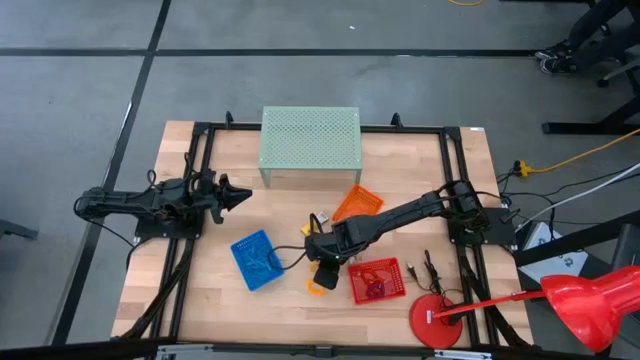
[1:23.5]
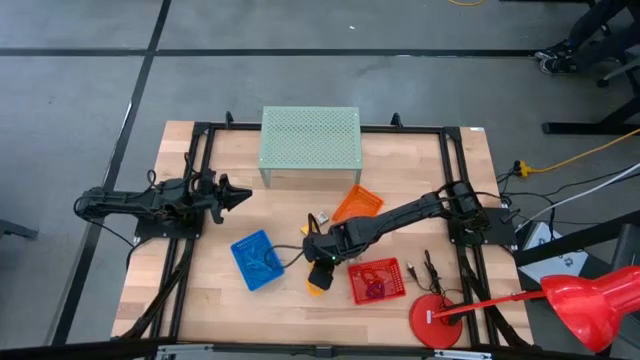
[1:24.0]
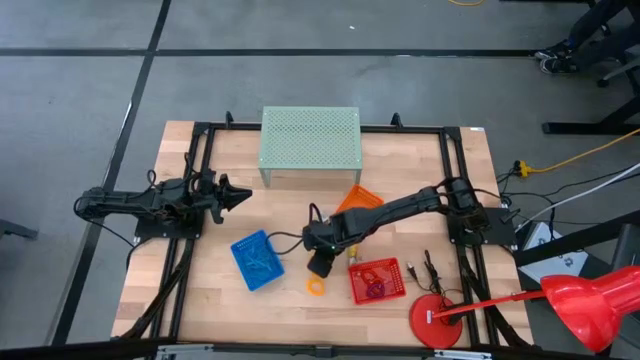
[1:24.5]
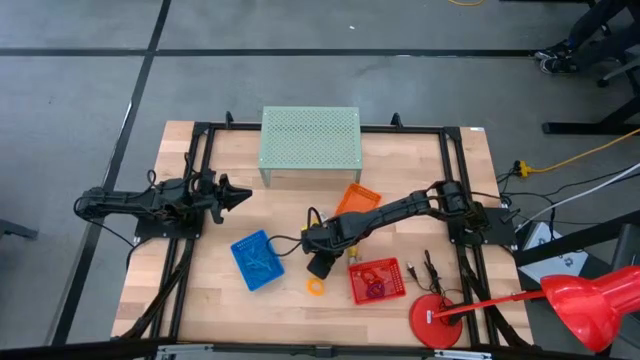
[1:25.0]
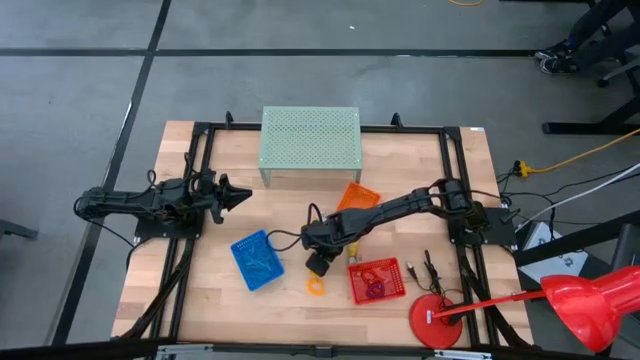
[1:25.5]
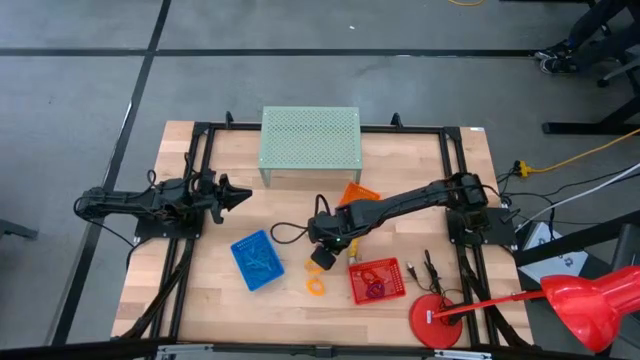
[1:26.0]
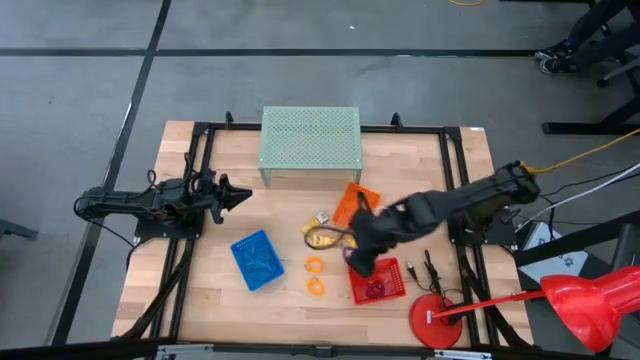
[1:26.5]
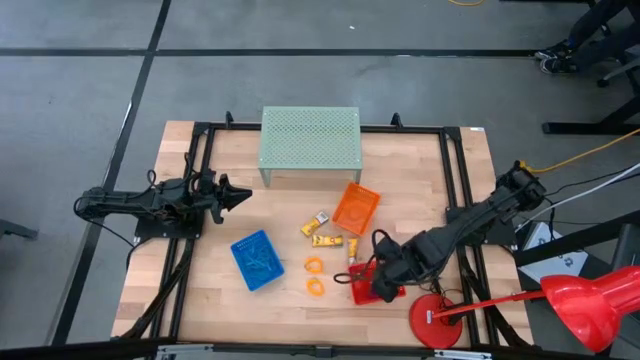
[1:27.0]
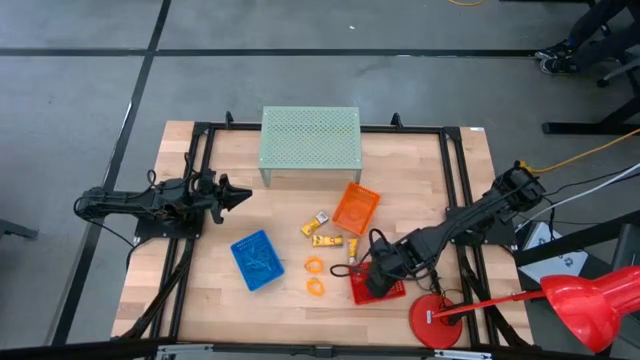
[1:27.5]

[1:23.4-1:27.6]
Task: Pick & Place Office Desk Supplies
Put the violet spring keychain into the red bin

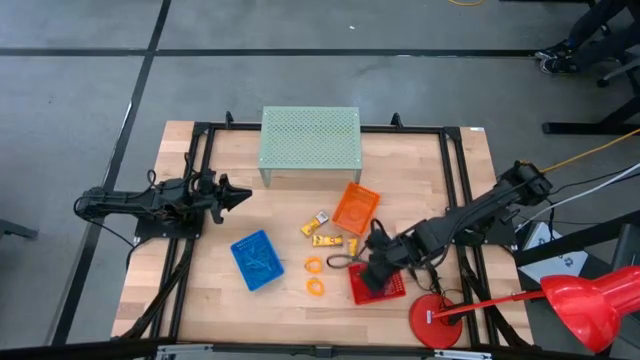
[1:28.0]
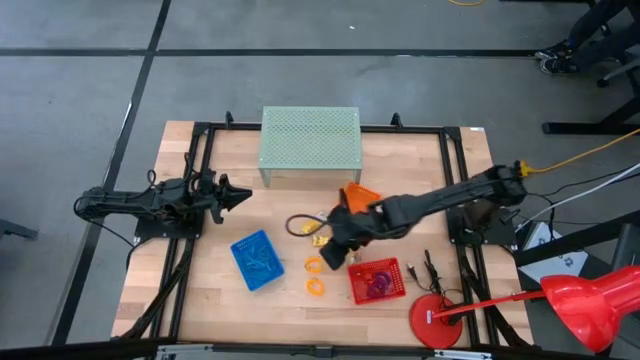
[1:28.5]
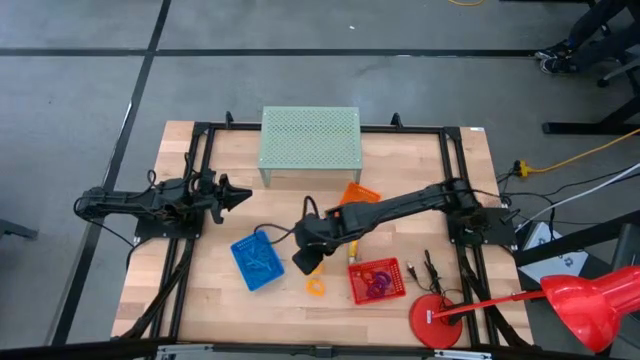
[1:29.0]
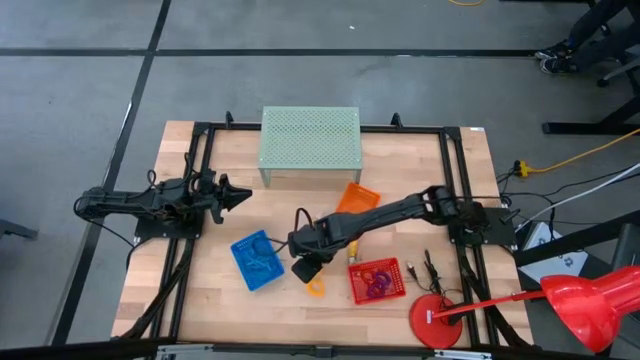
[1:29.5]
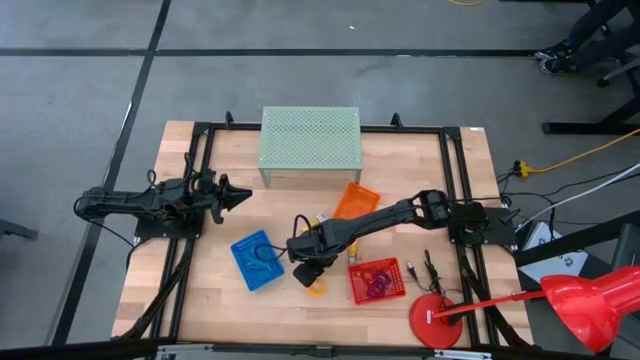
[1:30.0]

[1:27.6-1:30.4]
Put the yellow spring keychain into the red bin

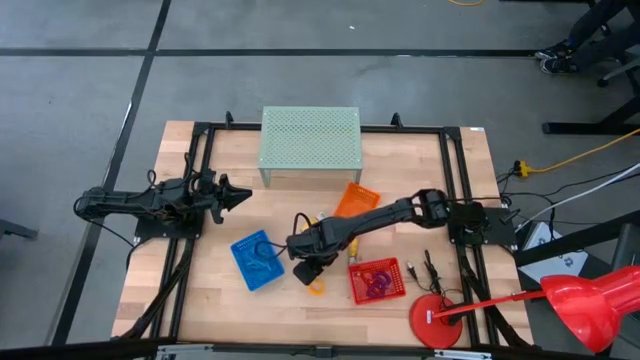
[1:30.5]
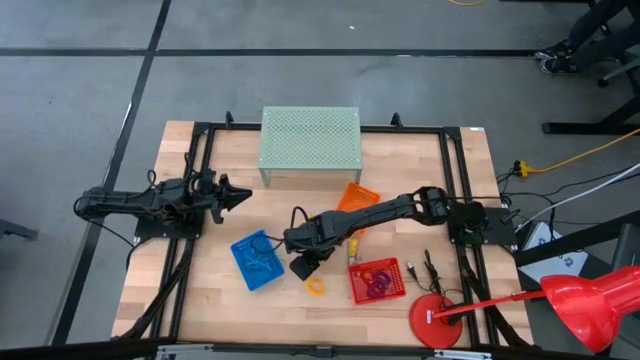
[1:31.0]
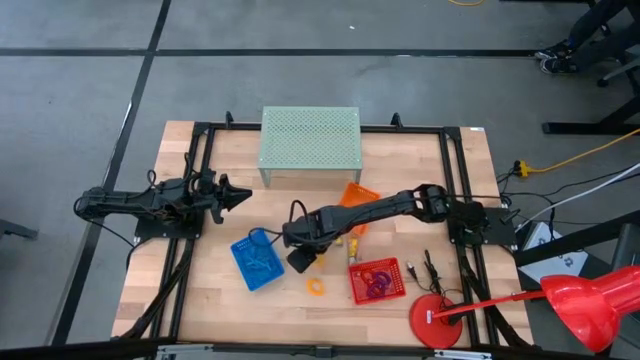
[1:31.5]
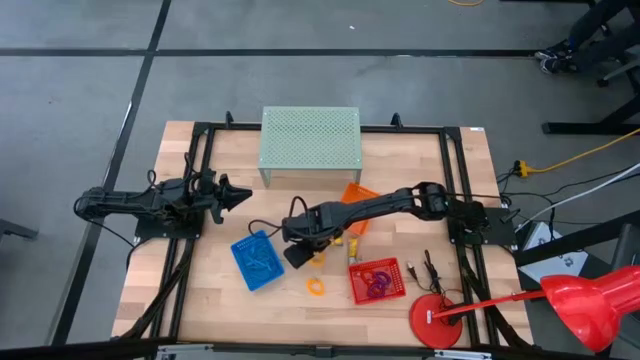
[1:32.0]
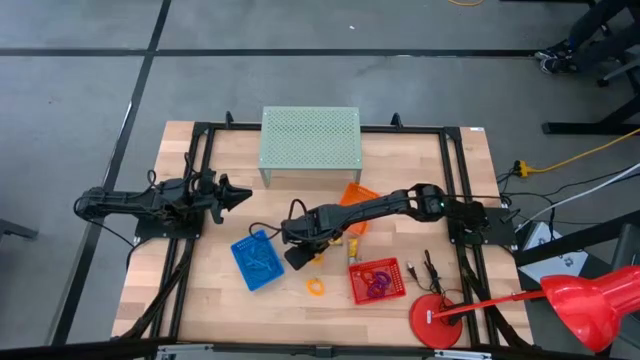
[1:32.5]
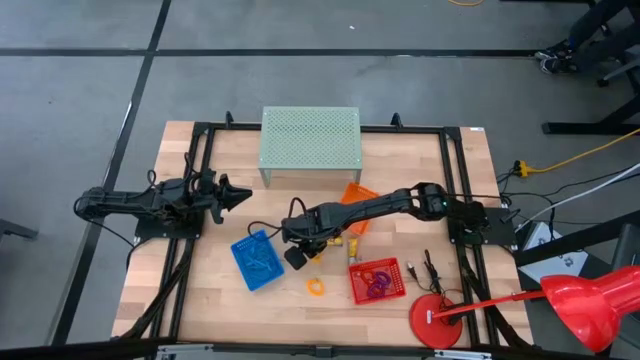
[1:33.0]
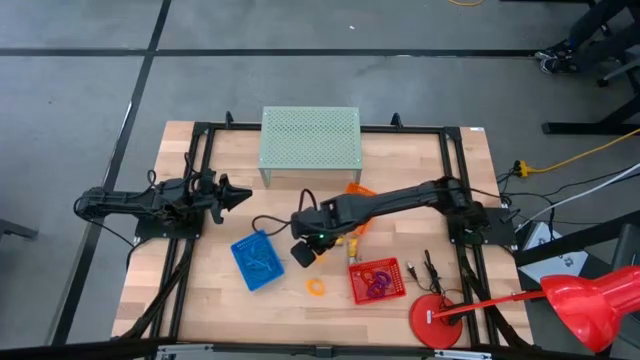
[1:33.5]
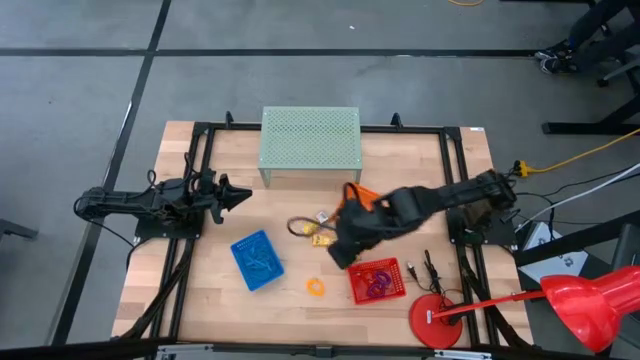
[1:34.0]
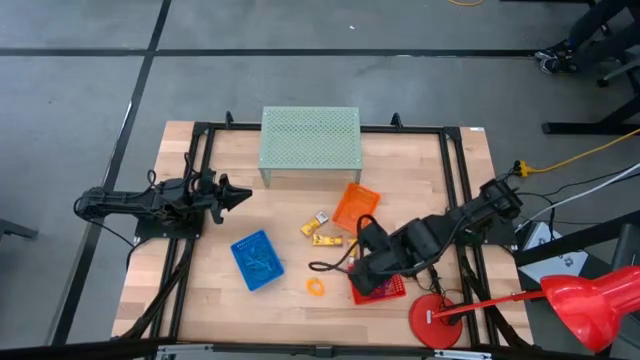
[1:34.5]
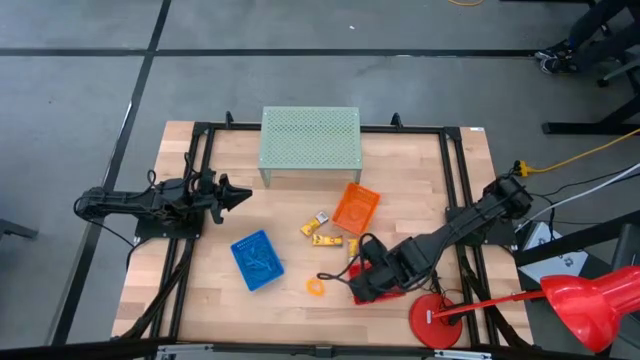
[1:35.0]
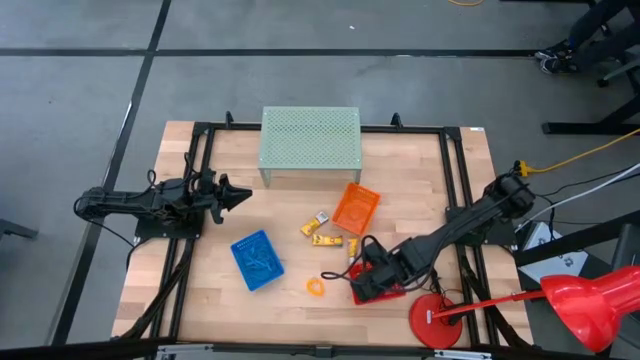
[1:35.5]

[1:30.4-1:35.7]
Put the yellow spring keychain into the red bin

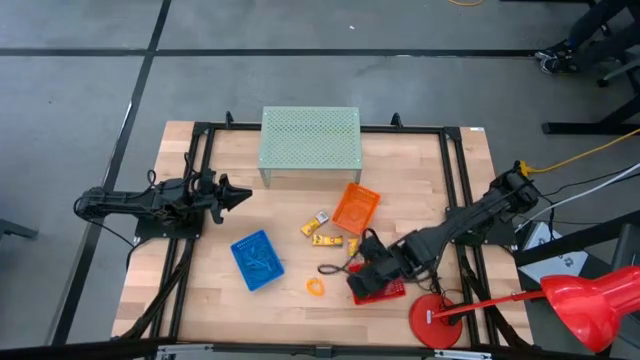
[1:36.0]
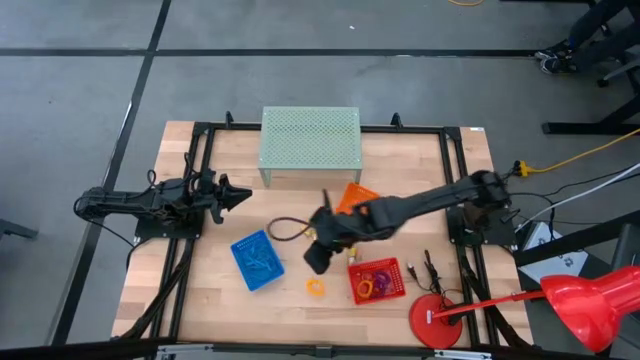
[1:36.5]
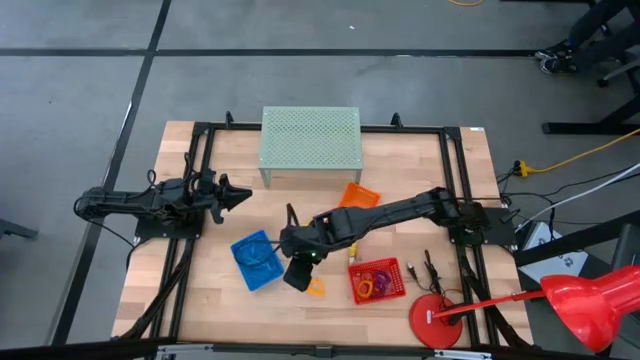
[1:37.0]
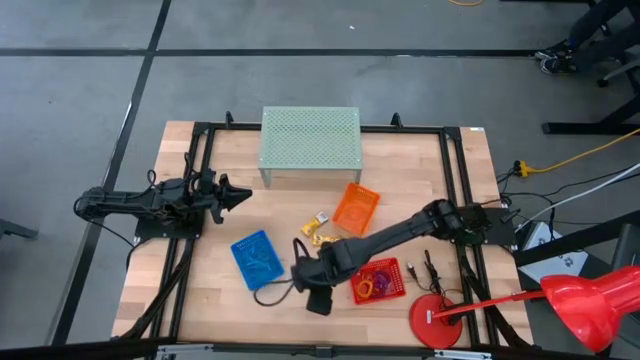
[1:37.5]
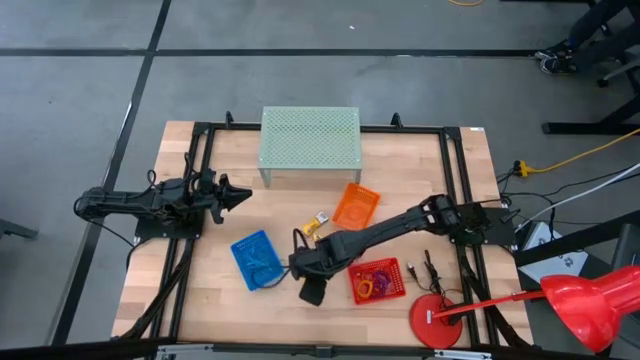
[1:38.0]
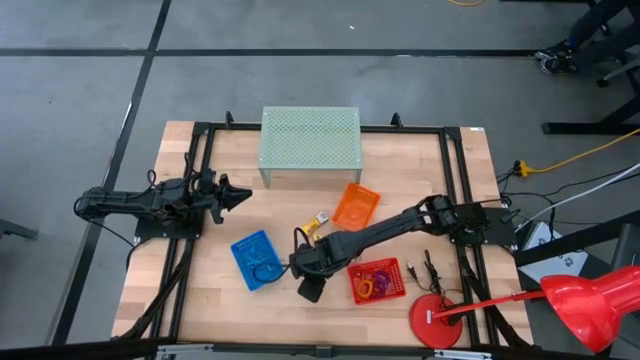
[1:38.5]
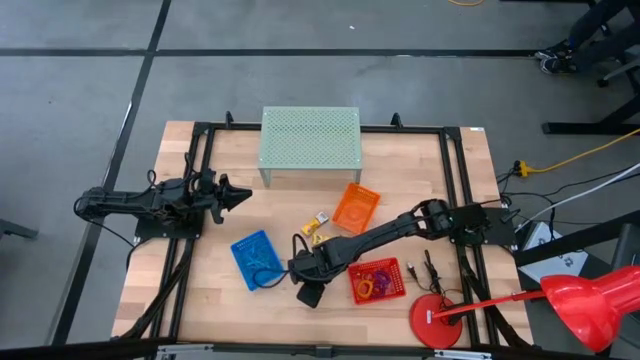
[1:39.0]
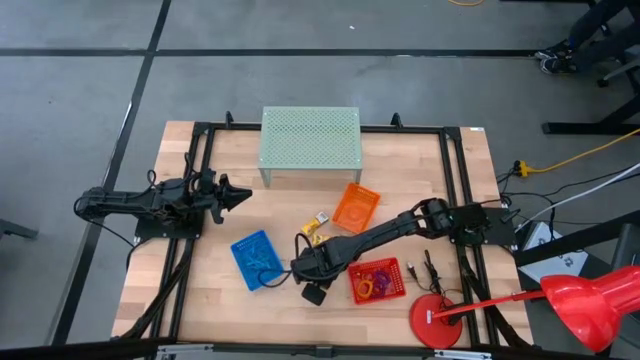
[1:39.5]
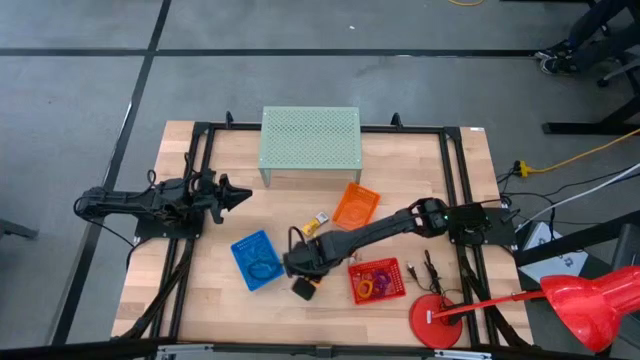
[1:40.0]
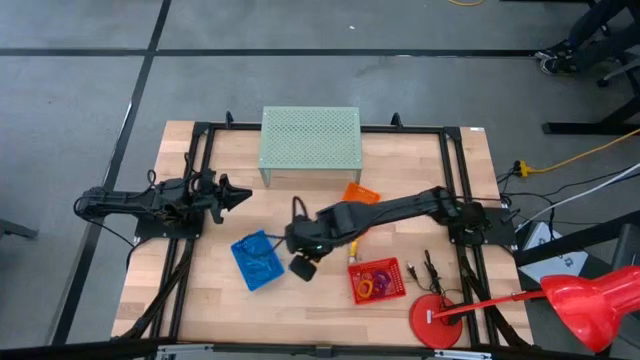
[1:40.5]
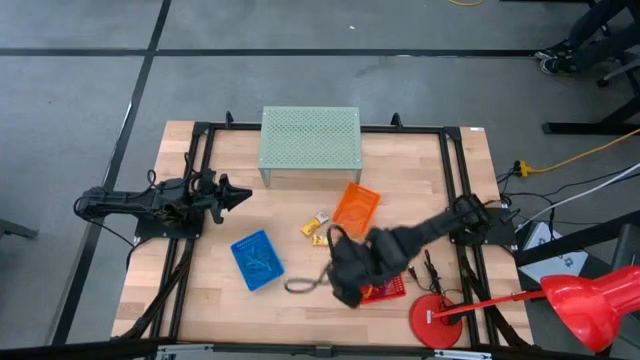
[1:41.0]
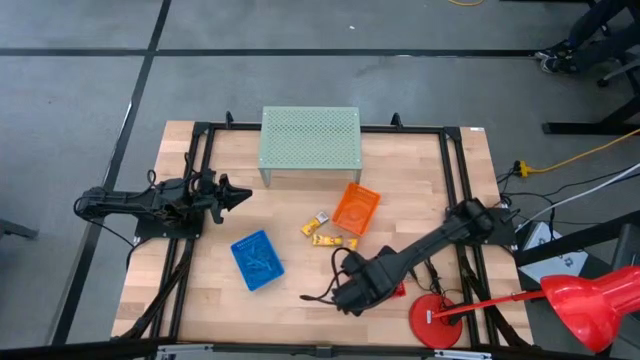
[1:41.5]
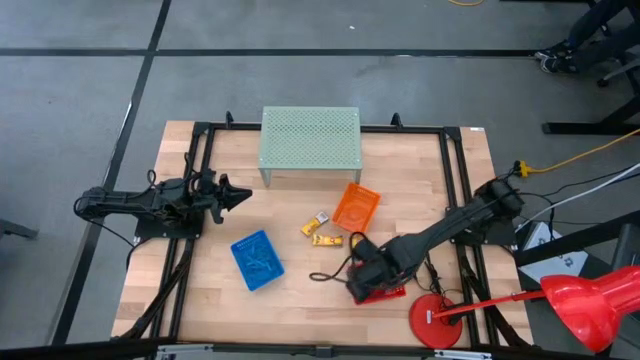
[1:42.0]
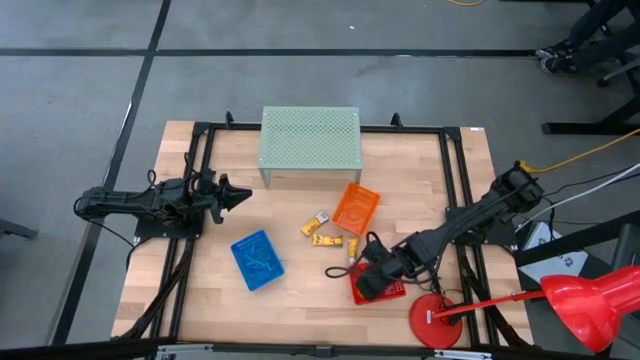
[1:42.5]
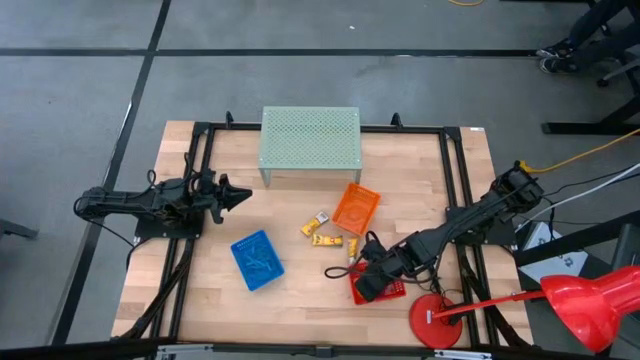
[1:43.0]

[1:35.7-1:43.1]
Put the yellow spring keychain into the red bin

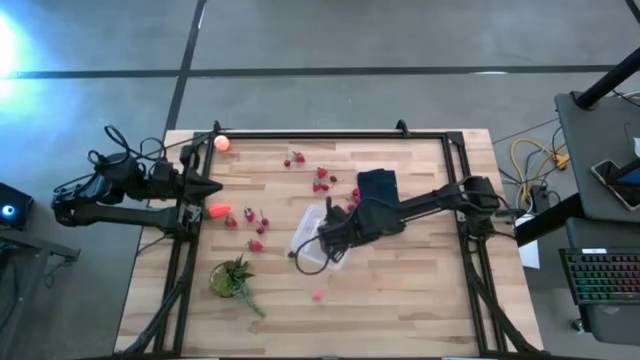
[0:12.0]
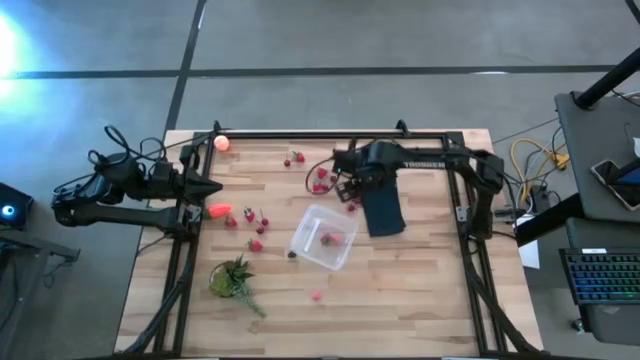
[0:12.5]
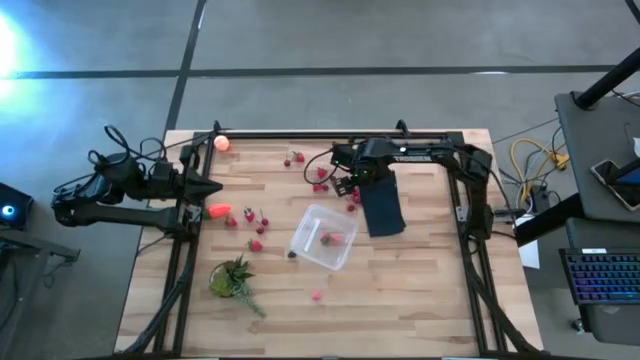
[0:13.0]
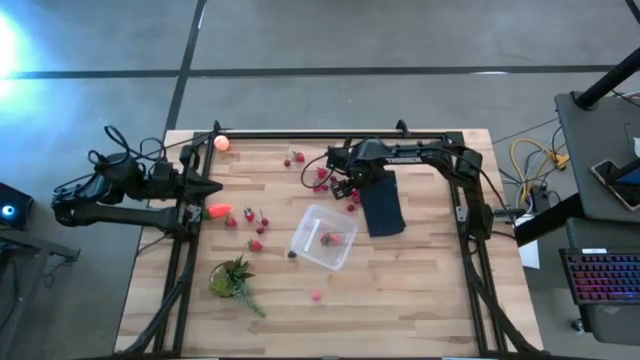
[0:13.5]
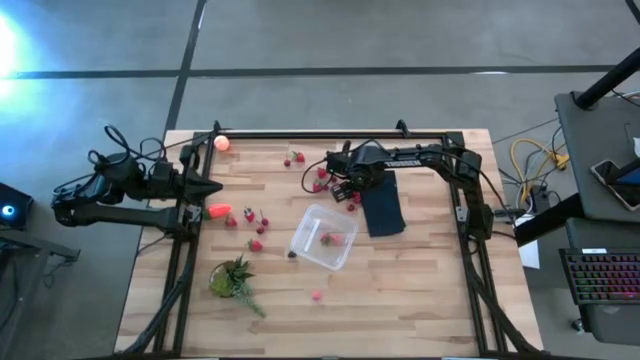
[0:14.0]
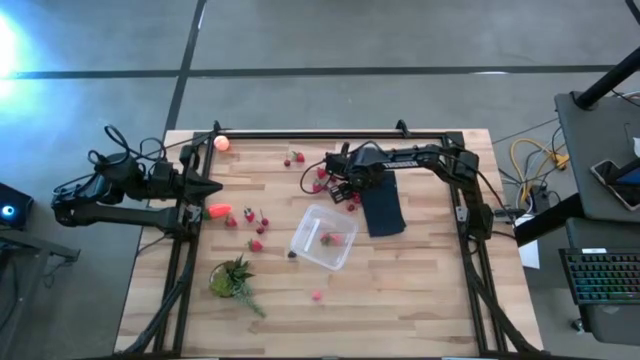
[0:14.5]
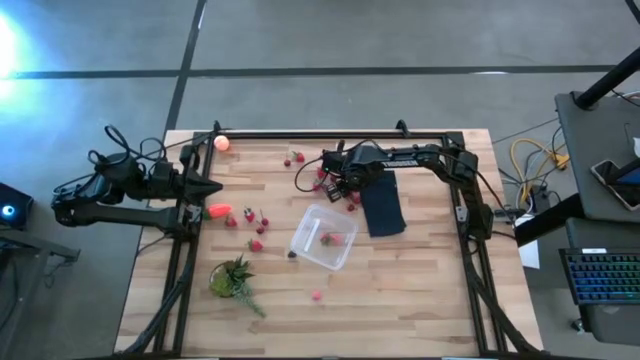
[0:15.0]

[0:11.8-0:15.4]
Task: Pick and placing Produce into tupperware
Put the red cherry into the transparent bin
